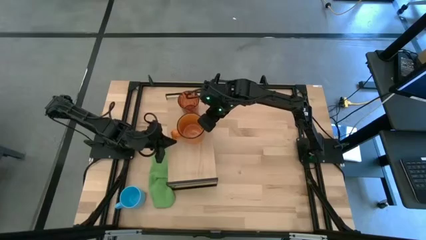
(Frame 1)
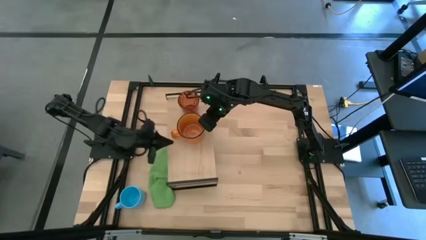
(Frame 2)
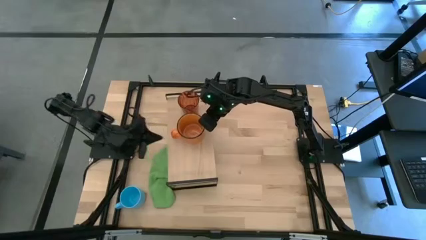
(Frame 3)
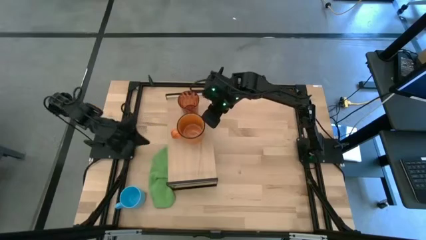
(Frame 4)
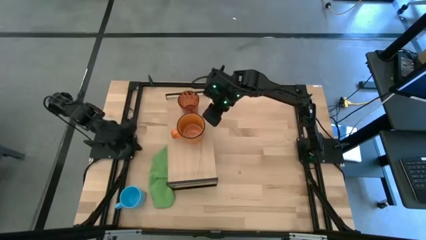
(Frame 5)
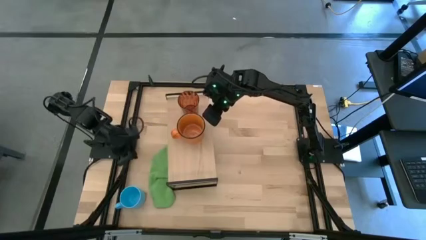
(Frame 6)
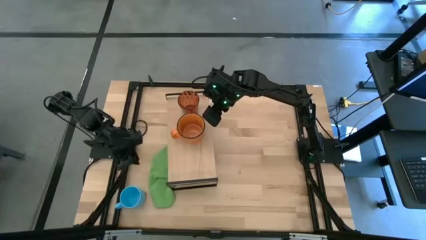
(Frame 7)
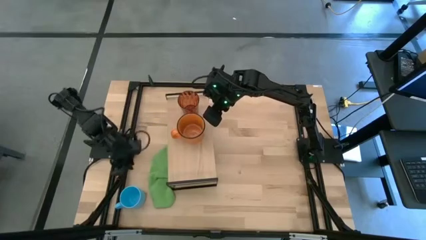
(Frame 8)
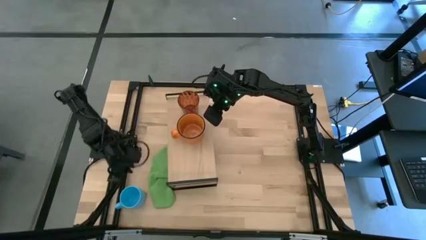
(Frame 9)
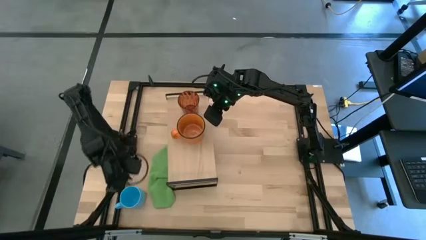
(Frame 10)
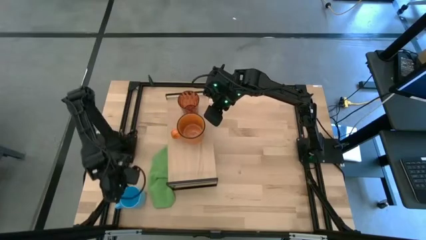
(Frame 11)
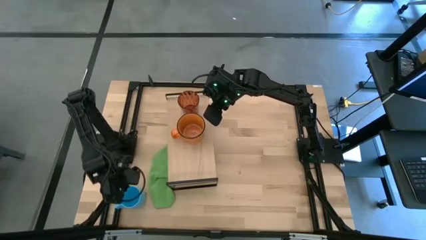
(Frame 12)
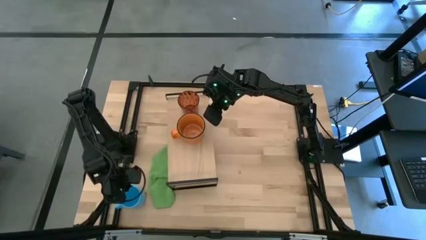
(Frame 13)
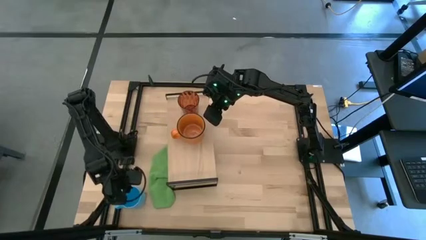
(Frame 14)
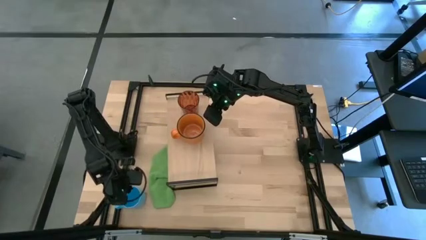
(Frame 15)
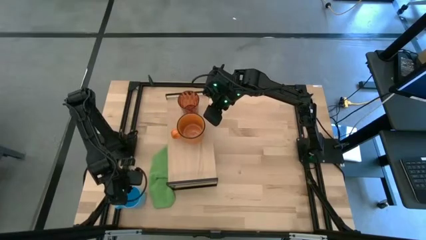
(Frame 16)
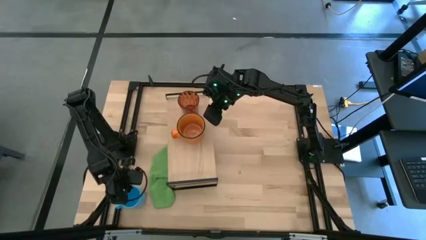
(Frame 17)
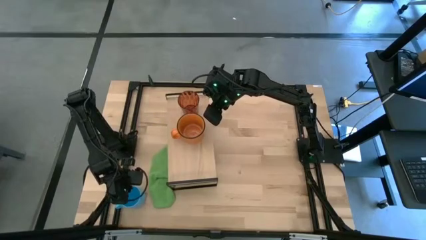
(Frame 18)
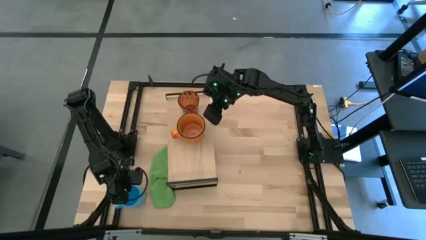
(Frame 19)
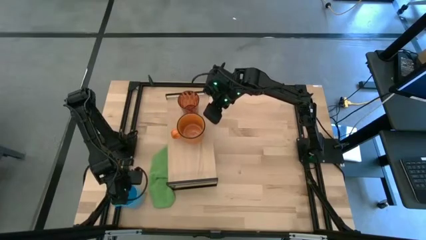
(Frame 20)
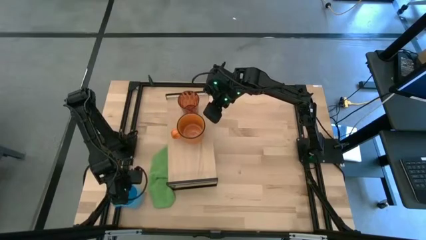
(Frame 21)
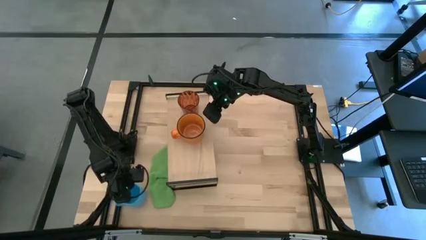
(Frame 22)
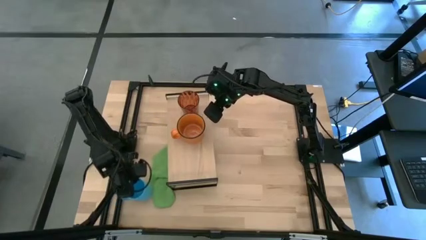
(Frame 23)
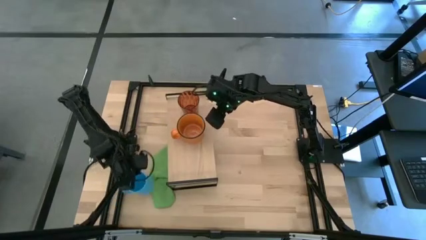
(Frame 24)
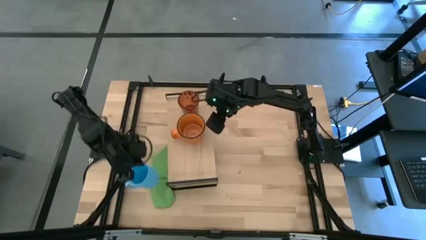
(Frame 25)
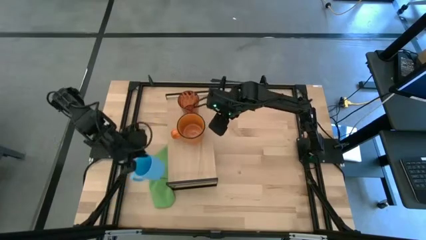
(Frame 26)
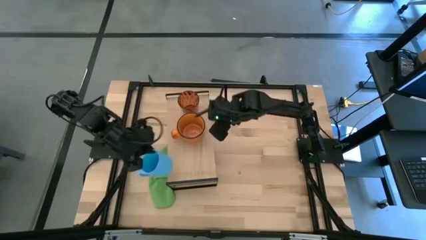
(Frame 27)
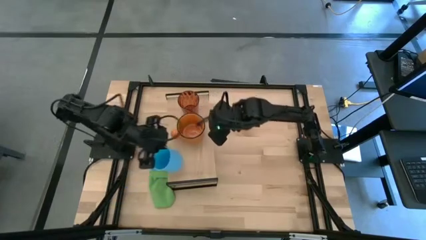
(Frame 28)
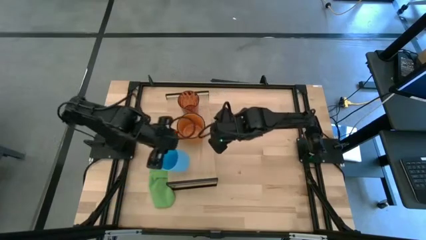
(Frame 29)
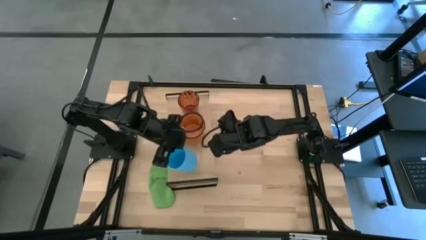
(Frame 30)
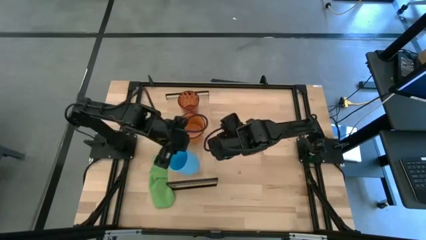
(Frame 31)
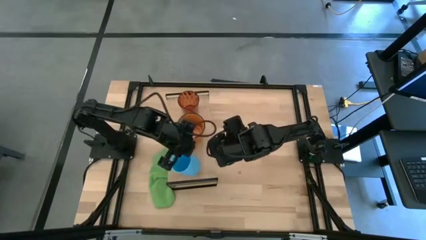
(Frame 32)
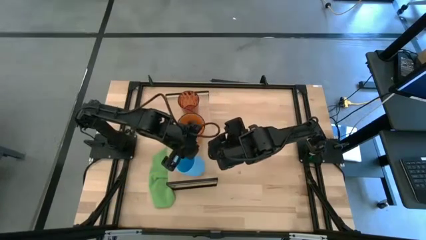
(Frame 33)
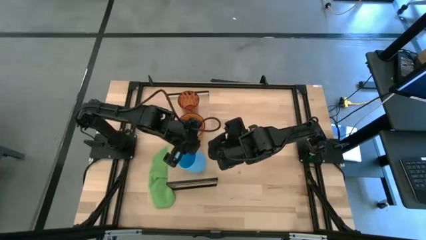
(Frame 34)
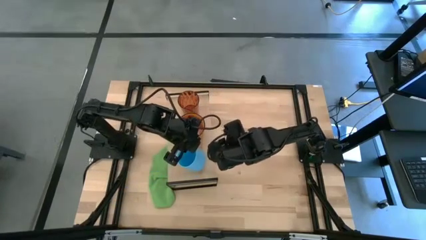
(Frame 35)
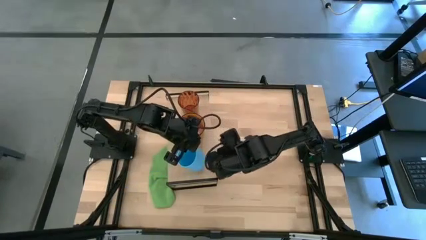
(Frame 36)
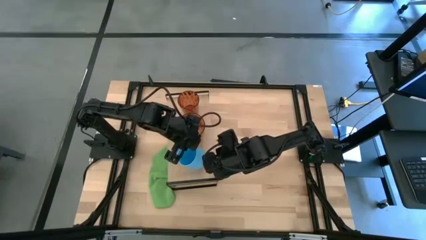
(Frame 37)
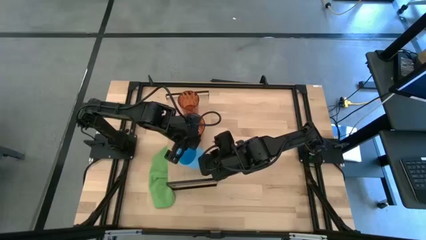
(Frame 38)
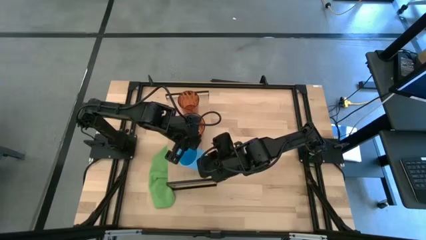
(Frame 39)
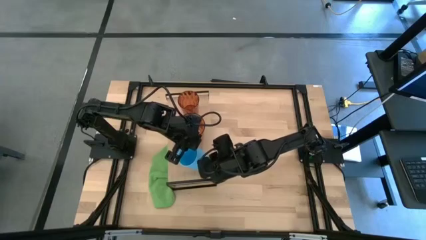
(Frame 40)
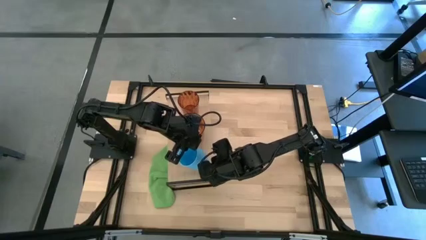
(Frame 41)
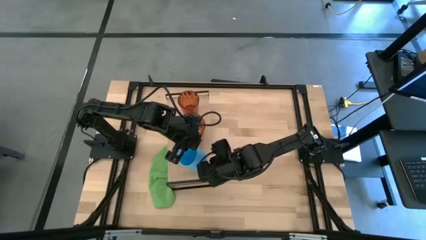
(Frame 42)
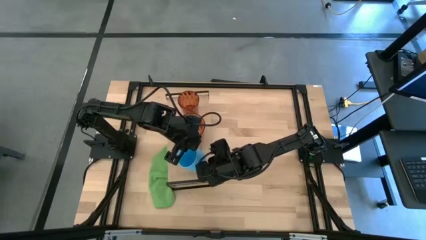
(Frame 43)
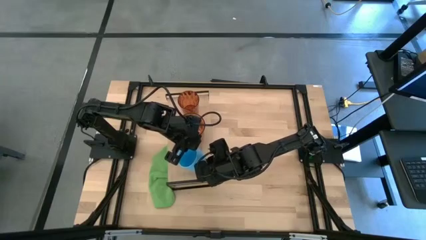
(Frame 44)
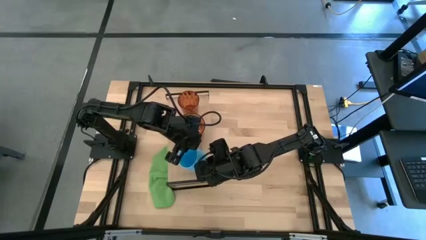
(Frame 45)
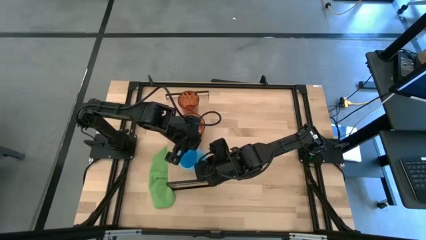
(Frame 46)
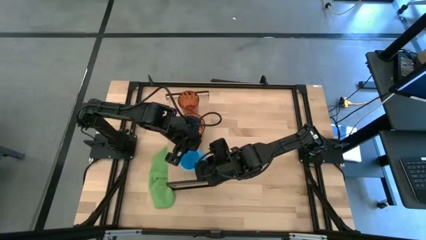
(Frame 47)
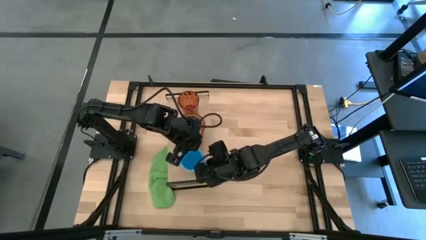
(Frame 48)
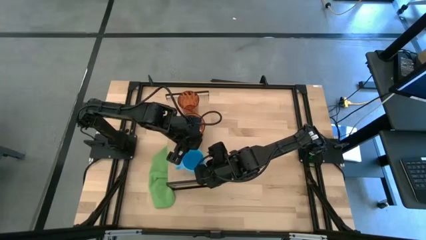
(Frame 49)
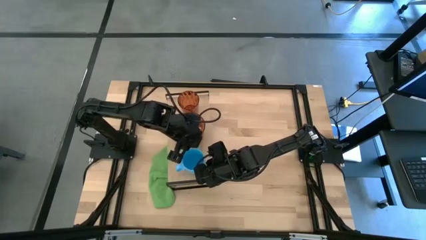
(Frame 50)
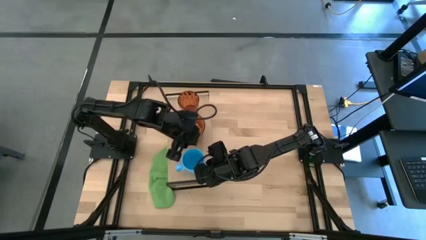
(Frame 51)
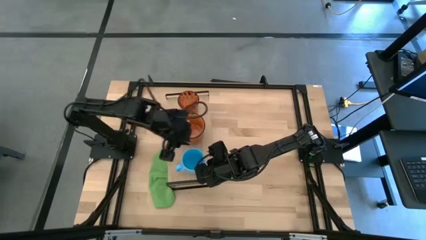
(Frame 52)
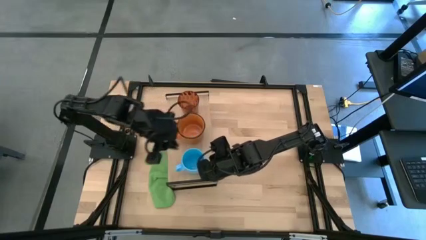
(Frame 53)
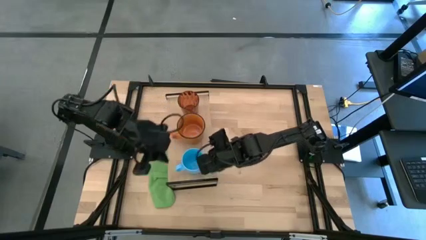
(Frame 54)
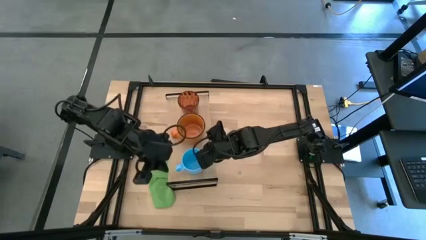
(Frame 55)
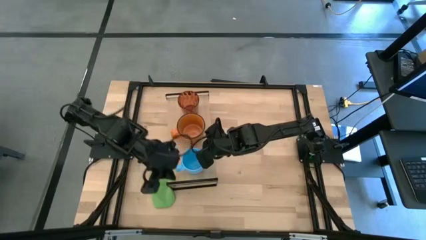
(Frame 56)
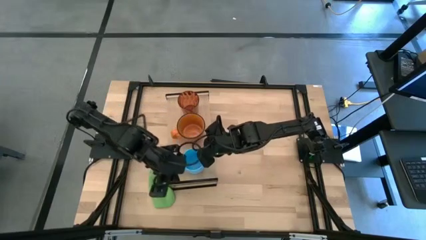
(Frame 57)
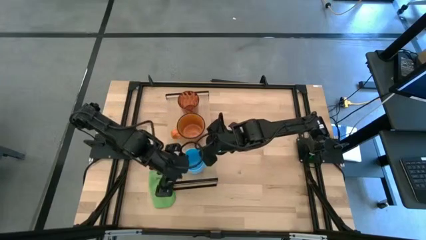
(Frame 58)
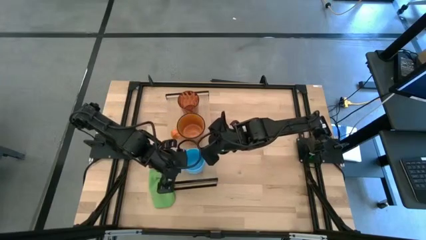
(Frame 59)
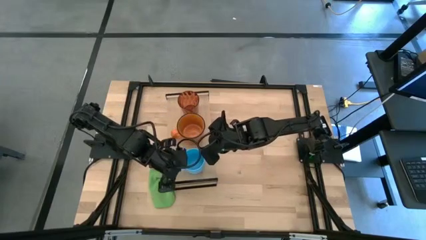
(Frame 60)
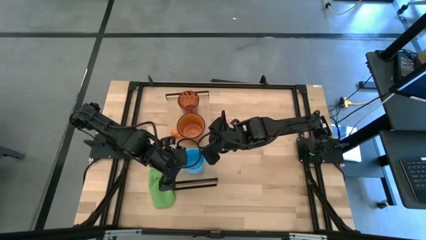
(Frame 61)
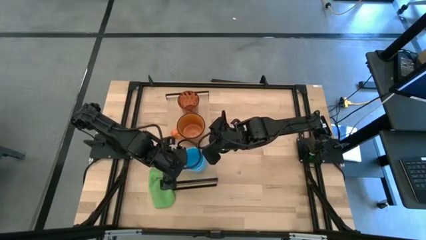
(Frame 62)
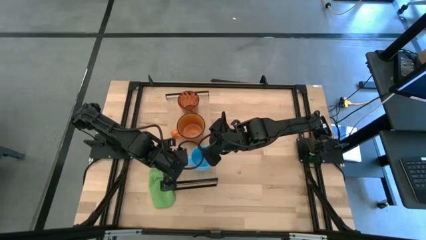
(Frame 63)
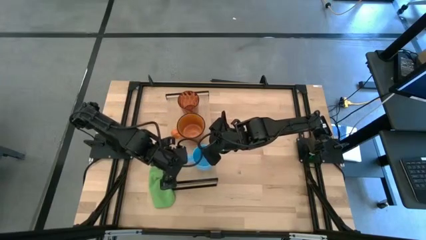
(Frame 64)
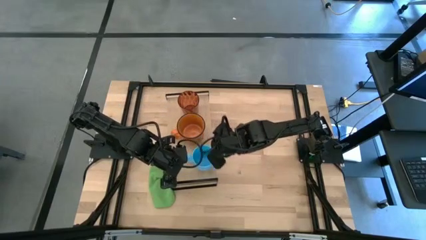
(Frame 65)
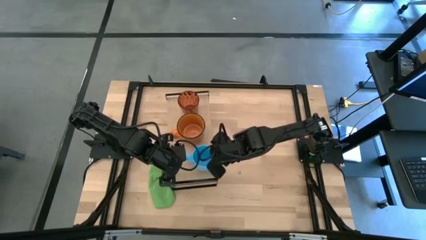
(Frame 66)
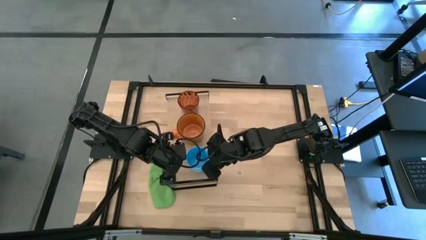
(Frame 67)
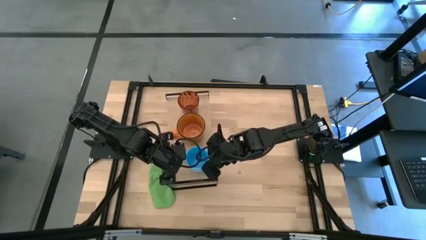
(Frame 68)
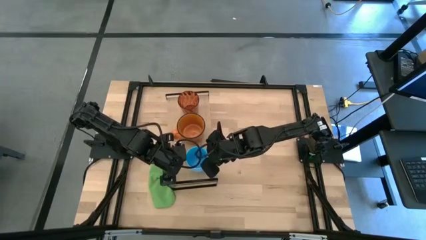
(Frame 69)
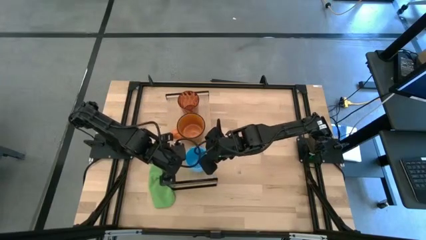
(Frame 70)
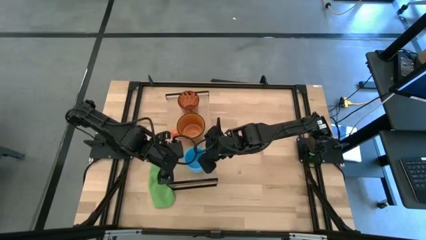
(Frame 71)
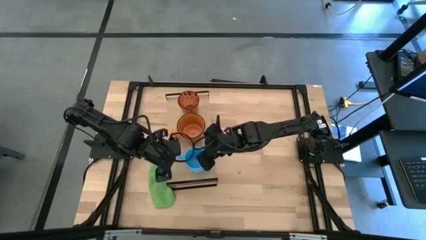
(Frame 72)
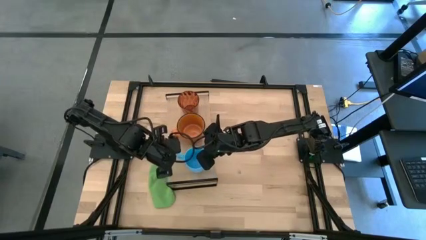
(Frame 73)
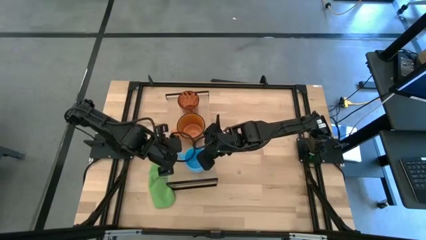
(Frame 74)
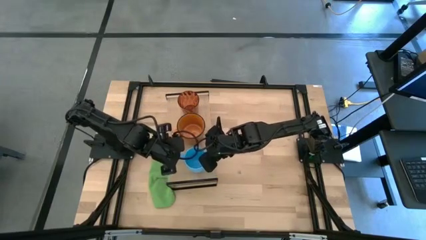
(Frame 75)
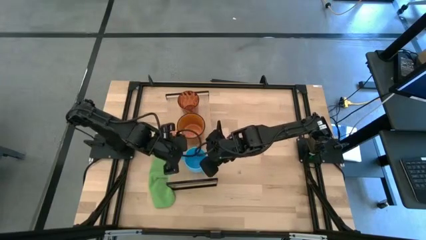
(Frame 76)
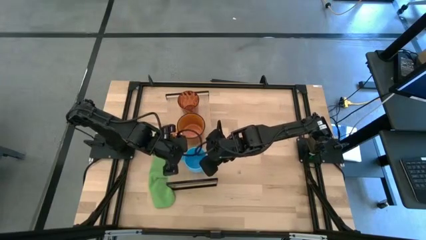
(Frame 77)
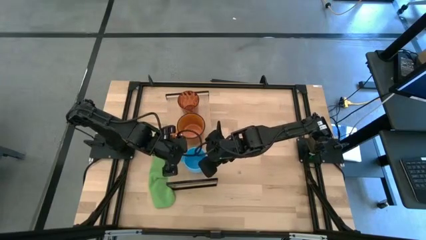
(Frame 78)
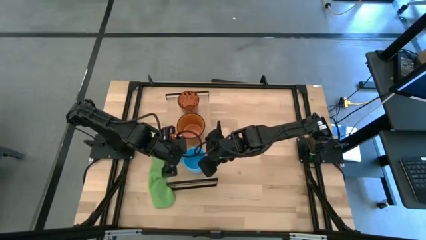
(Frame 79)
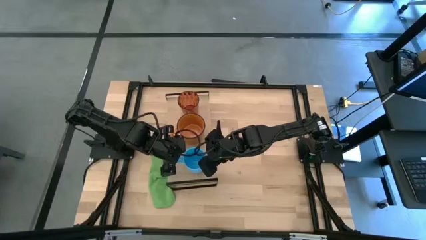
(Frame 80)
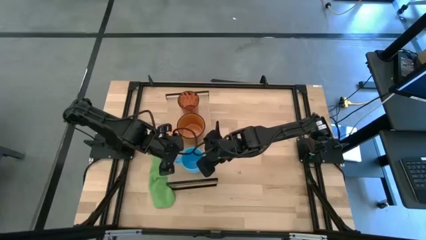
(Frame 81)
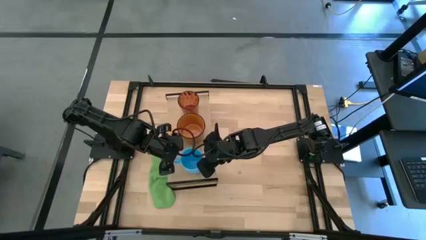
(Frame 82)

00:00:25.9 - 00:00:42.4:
Task: Stack small to large cups/mugs on shelf
Put the blue mug on the shelf
